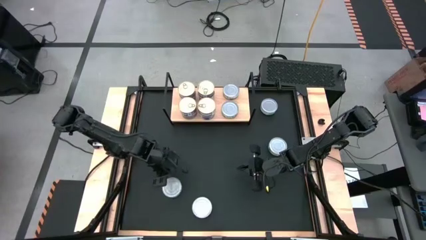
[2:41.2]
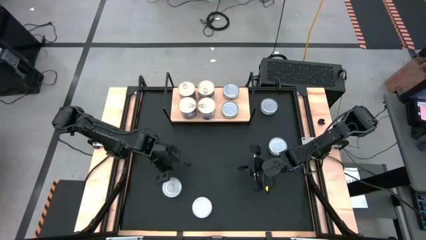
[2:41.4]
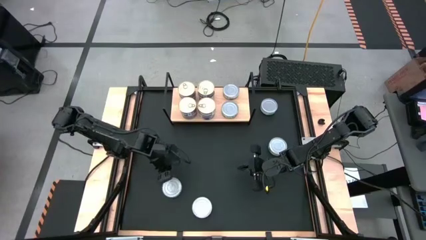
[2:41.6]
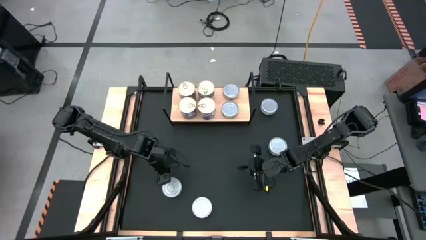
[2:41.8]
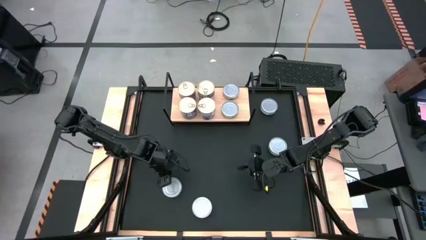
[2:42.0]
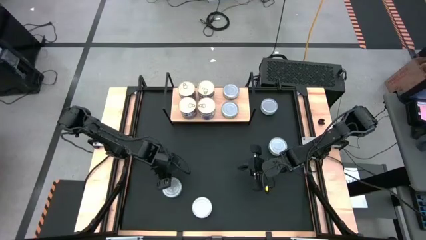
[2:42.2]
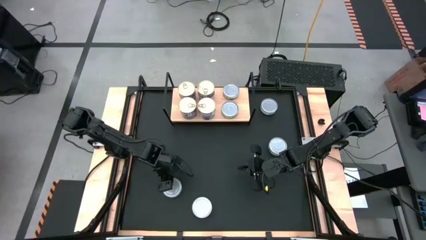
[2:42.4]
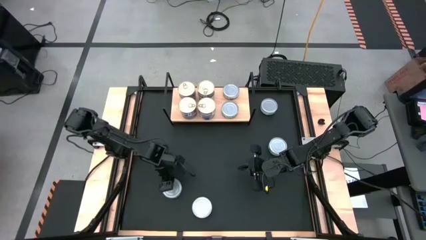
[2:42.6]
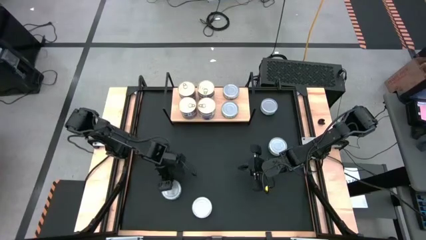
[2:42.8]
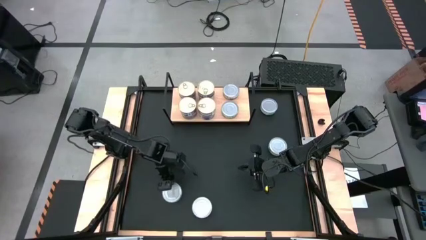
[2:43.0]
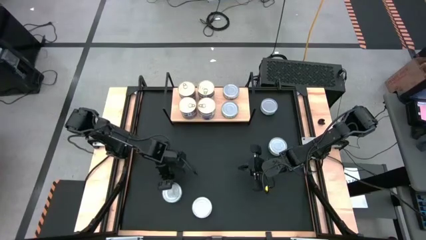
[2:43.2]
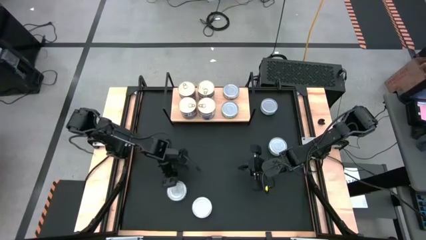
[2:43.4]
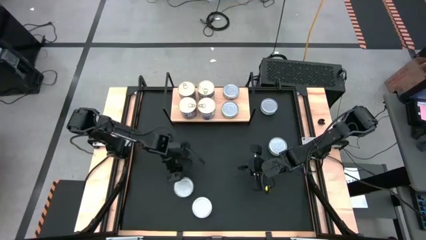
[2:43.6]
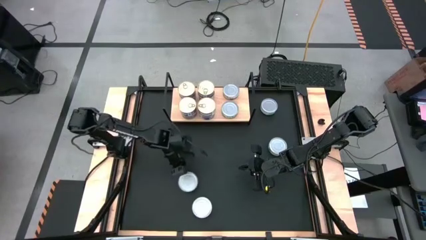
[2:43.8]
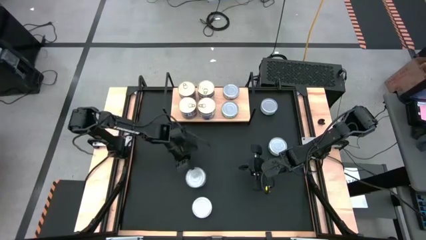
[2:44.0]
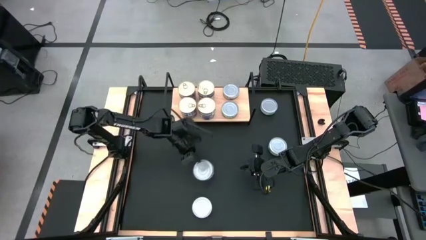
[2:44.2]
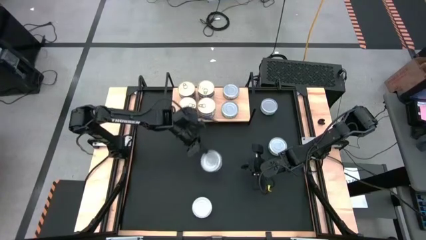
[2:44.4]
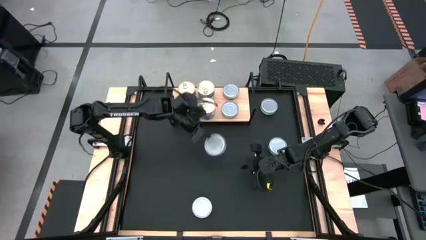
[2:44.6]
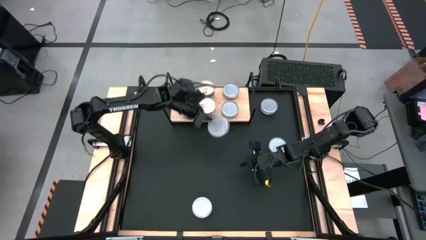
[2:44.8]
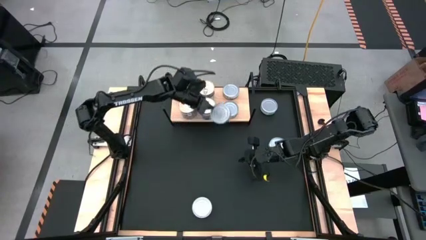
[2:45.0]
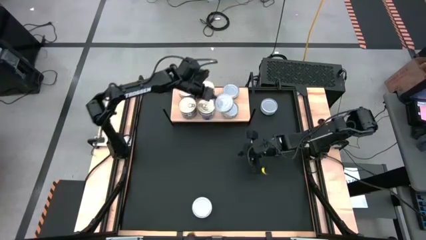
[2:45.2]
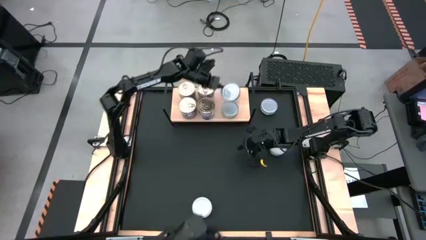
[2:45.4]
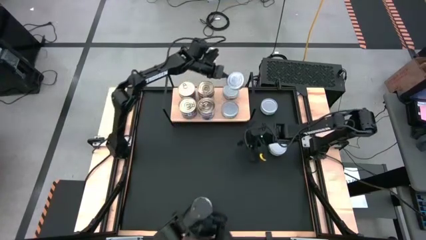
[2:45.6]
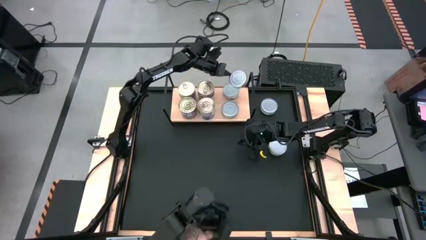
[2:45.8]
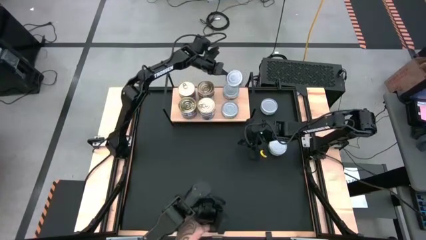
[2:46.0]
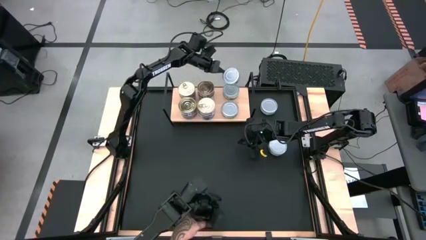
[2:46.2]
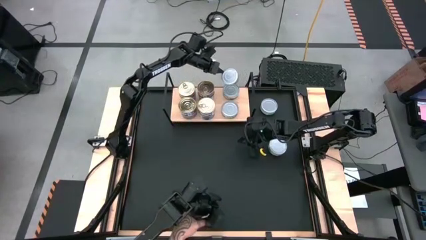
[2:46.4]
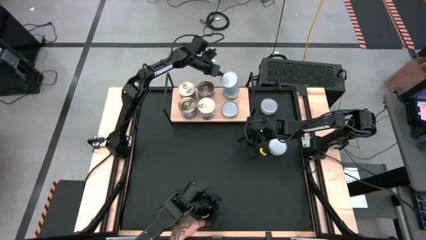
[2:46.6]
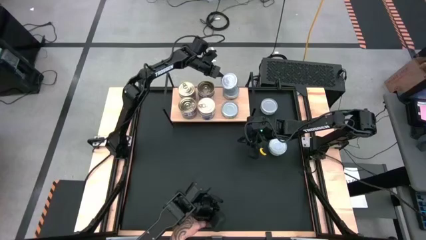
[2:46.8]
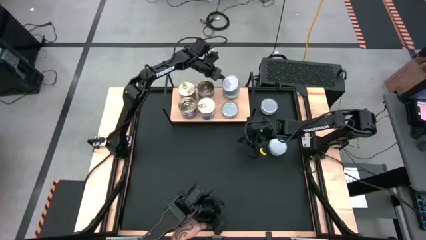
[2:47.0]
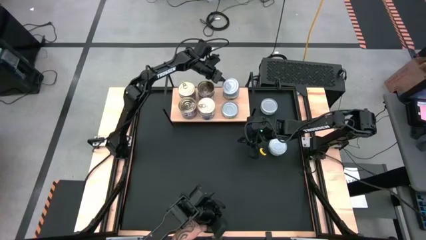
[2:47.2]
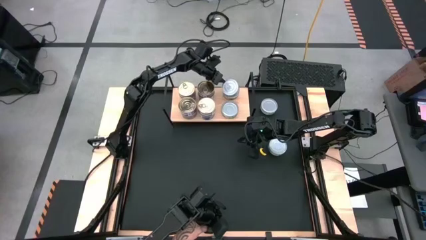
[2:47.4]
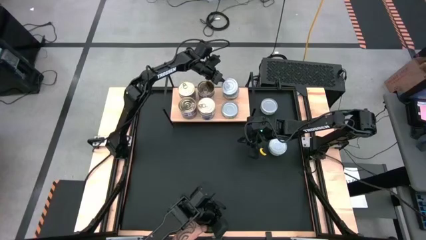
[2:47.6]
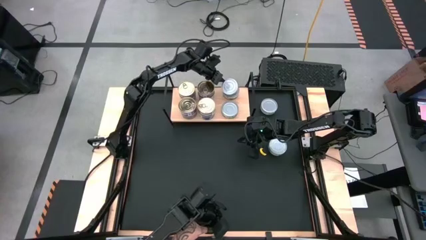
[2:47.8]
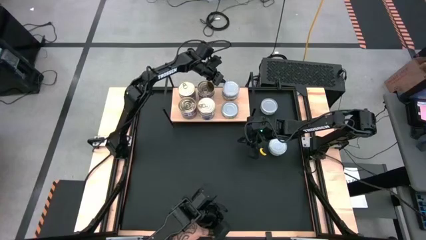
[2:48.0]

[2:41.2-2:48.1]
Task: Stack canned seafood by type on shelf
Stack the green tuna can on top of the green tuna can on the shelf

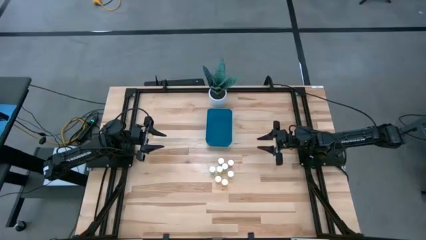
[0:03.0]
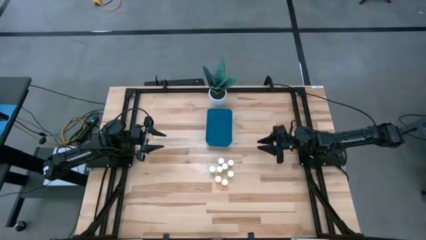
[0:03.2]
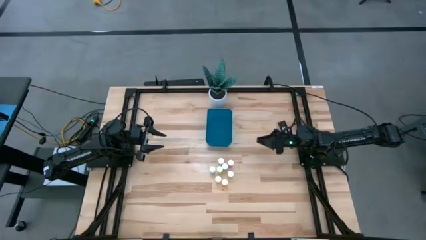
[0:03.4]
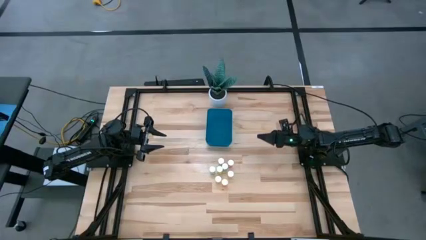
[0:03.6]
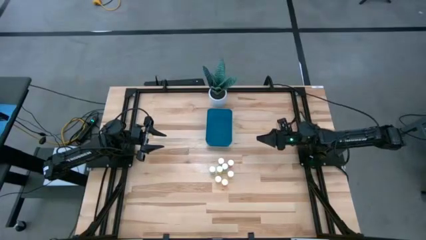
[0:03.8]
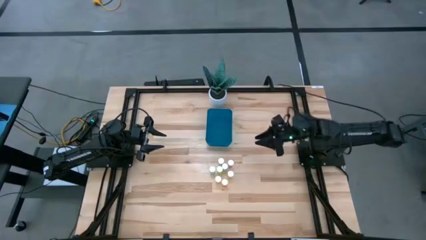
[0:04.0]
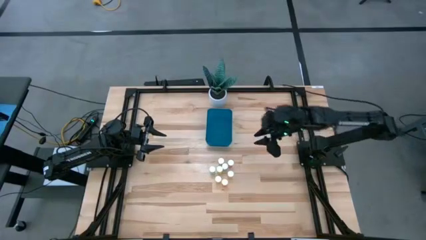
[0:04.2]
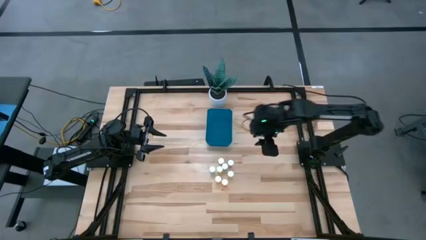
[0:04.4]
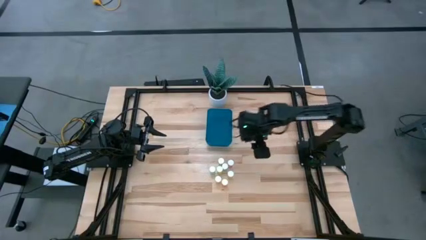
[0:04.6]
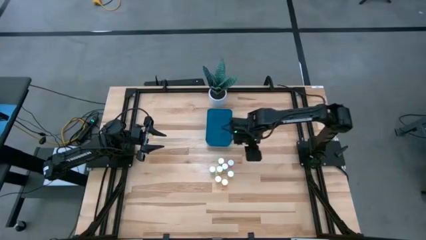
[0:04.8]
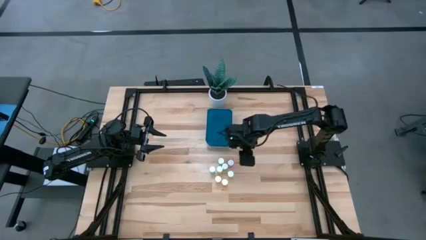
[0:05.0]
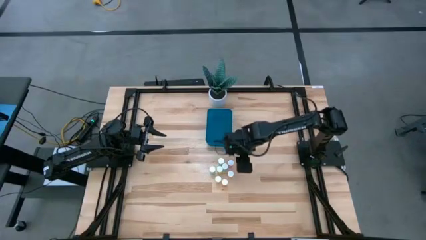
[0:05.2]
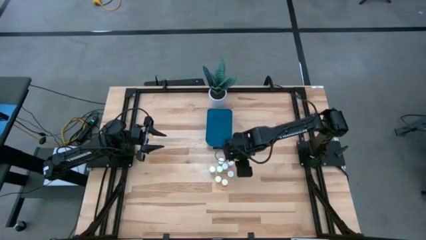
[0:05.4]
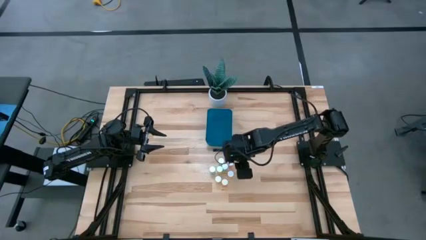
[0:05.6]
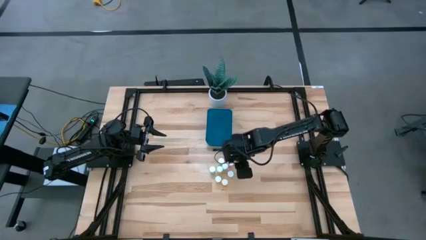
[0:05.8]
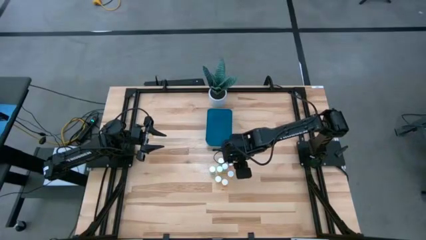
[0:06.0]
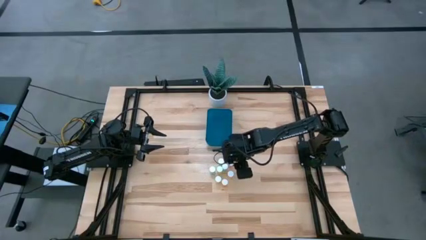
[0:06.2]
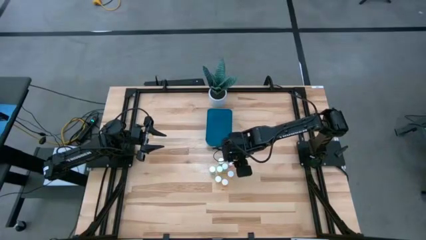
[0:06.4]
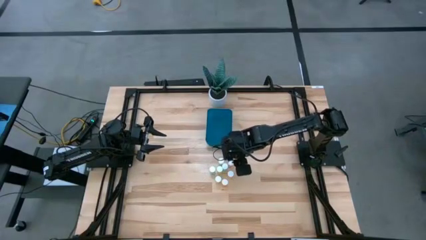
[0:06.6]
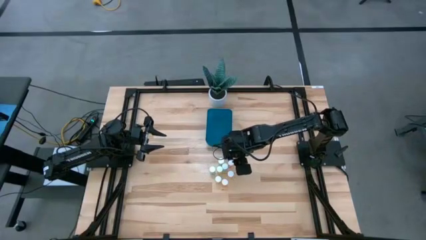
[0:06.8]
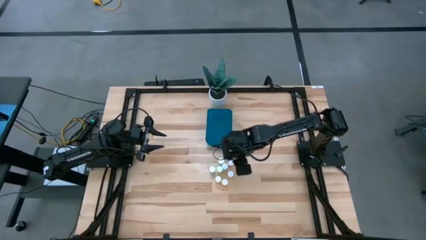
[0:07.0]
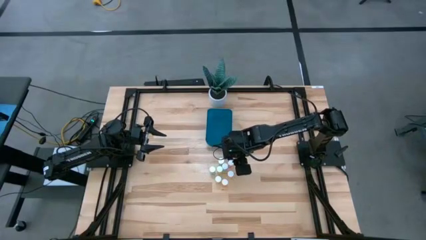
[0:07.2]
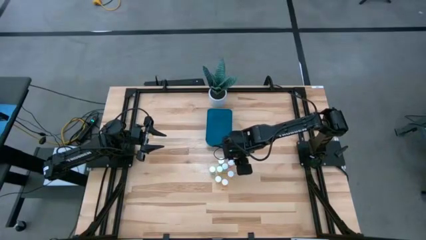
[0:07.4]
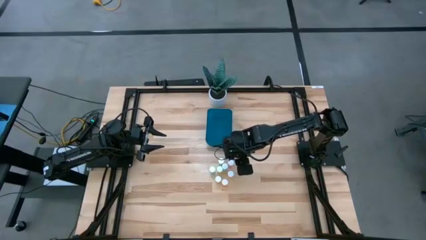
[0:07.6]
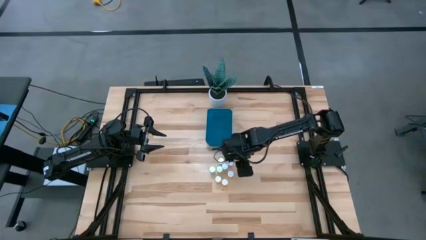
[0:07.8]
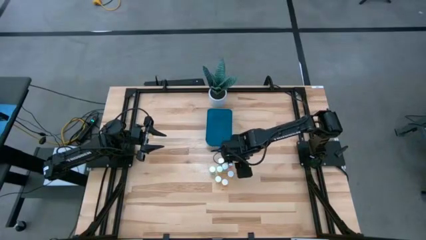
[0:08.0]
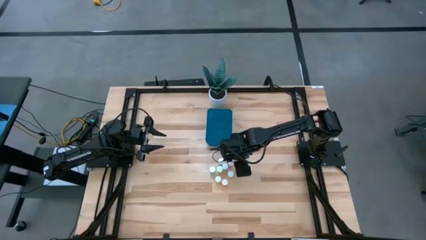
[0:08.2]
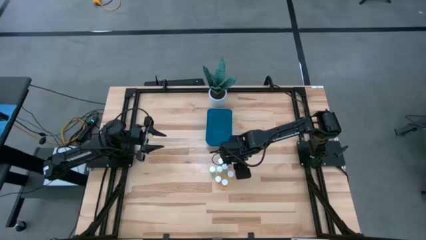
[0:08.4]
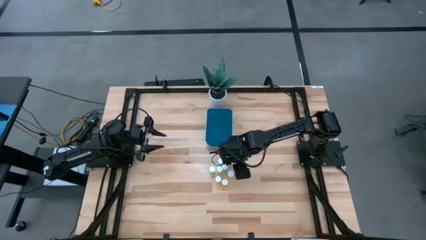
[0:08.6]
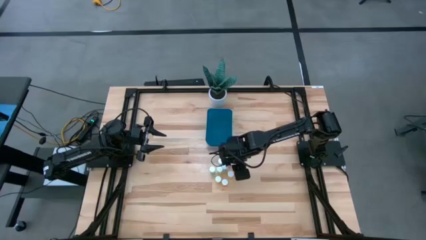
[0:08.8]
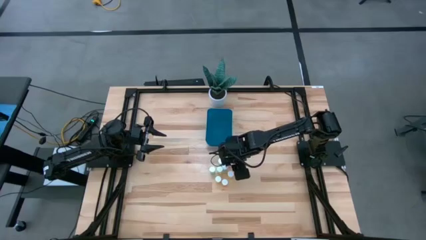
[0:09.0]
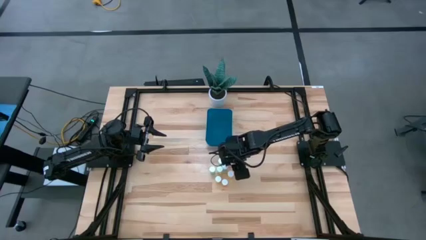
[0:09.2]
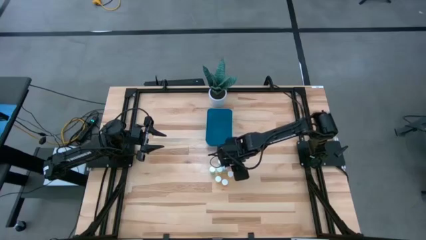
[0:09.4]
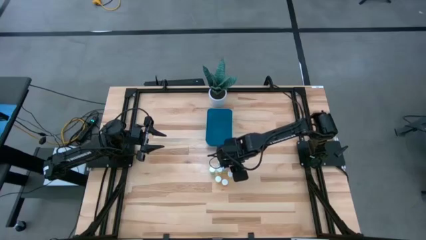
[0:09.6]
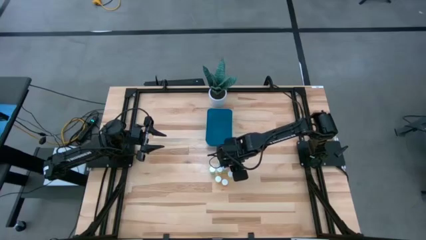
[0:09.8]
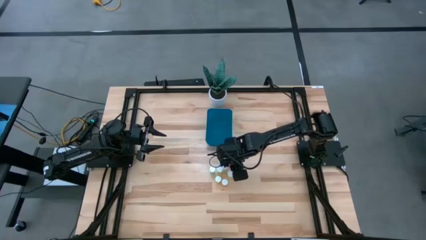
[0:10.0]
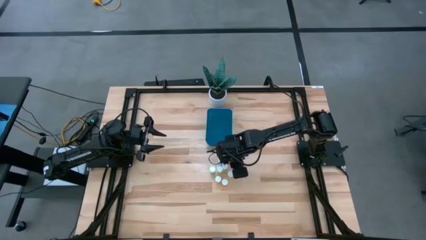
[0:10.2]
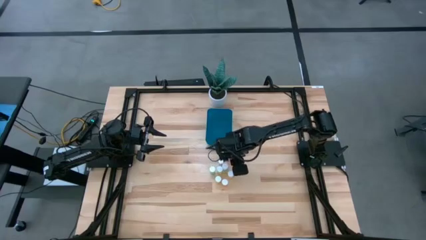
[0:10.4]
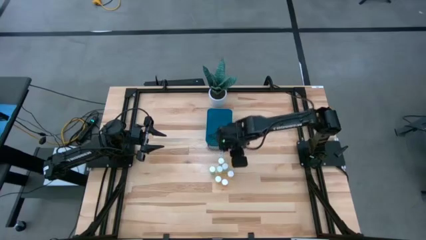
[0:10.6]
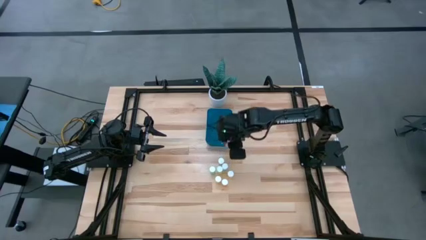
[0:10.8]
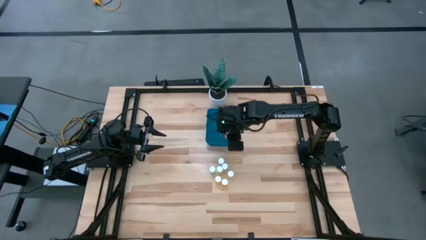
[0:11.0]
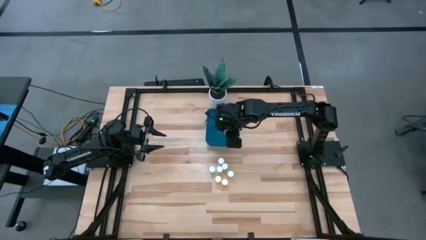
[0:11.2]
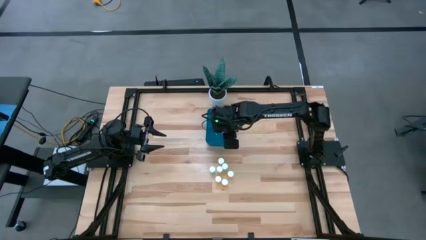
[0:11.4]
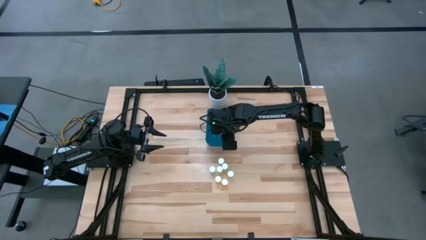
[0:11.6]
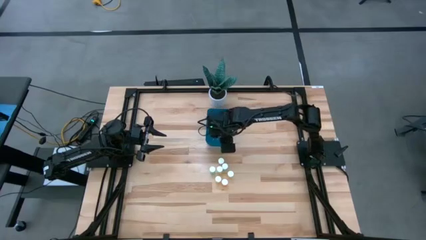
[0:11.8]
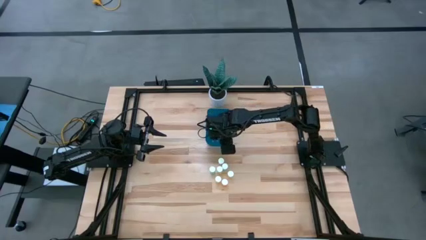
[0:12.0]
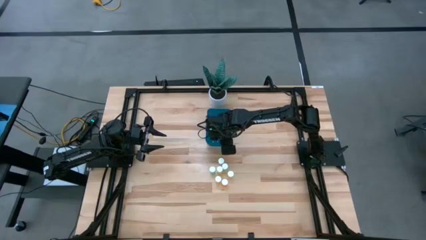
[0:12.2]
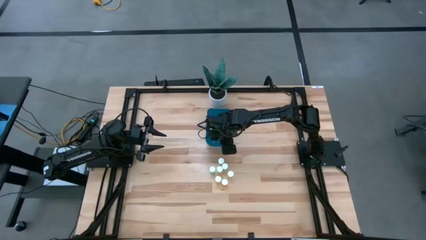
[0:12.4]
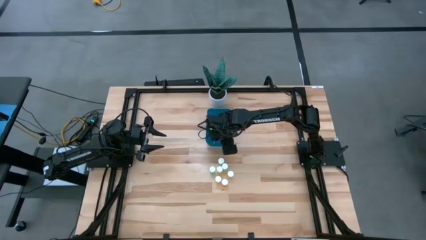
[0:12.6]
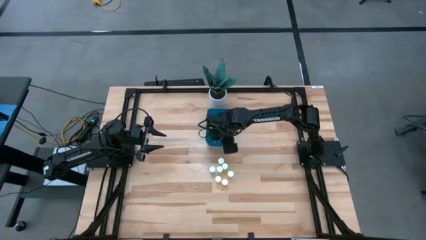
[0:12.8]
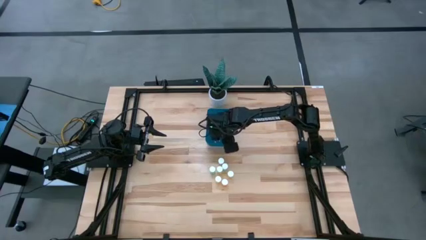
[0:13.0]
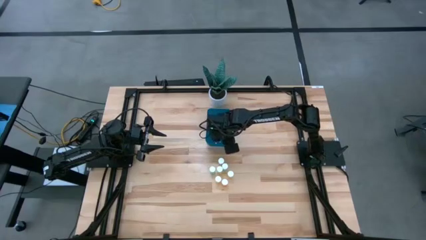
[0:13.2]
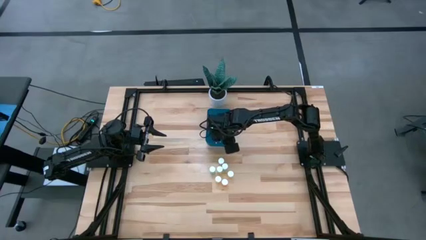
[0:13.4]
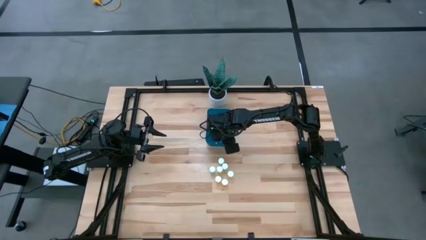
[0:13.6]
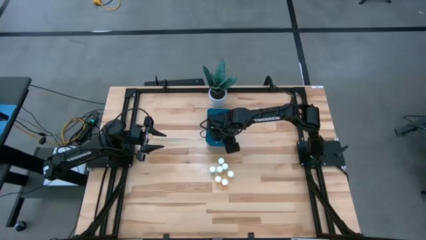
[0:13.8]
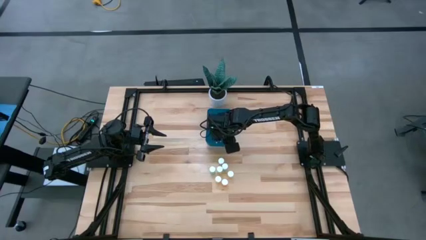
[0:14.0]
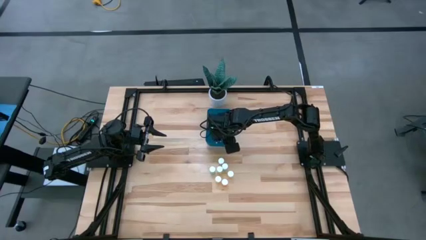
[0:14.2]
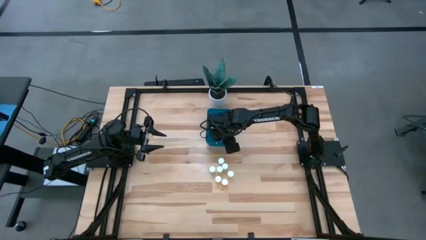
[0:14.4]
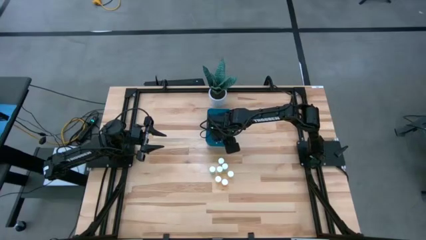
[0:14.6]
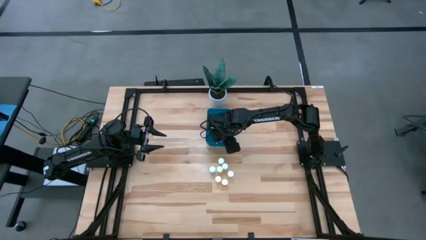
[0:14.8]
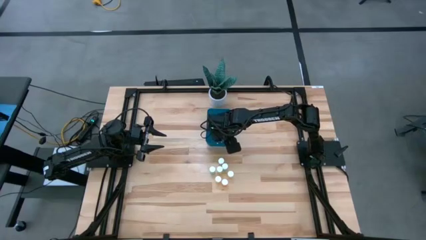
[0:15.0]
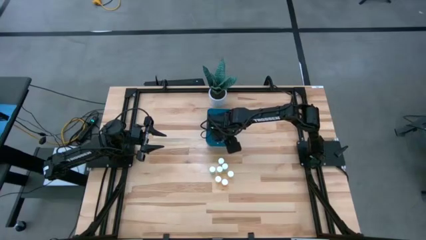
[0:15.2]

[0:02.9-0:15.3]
Task: Pick and place pill bottles into a basket
Put the pink pill bottle into the bin
